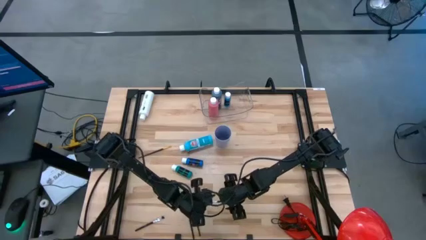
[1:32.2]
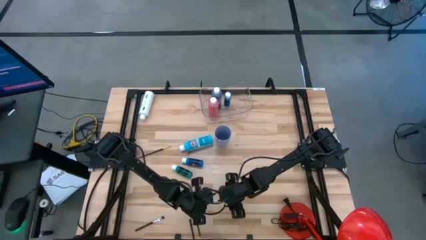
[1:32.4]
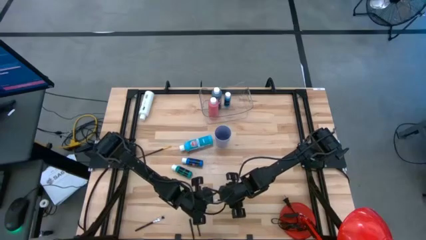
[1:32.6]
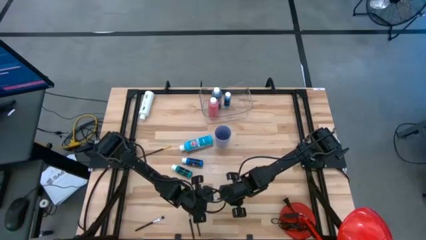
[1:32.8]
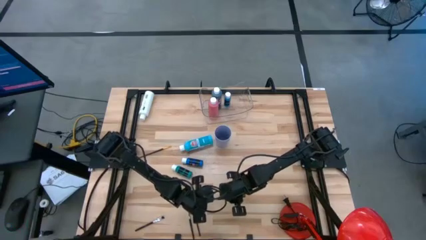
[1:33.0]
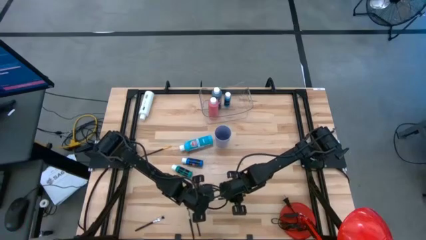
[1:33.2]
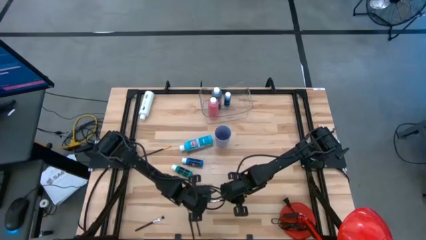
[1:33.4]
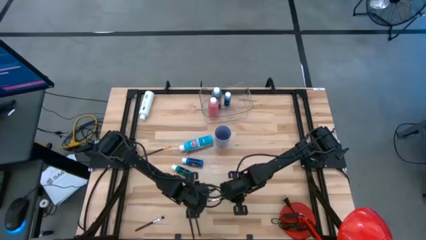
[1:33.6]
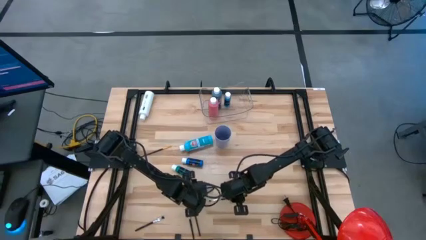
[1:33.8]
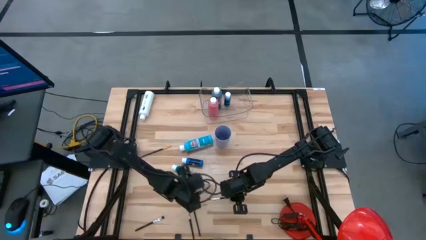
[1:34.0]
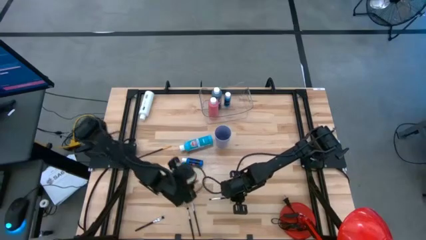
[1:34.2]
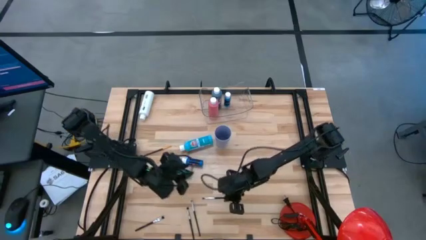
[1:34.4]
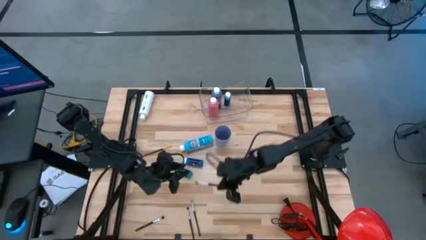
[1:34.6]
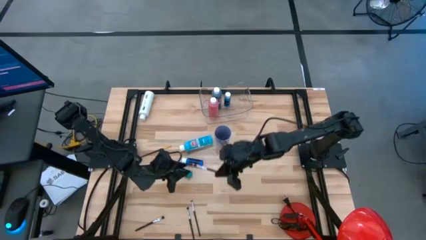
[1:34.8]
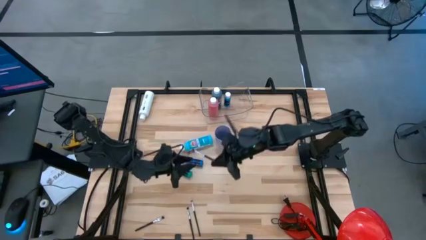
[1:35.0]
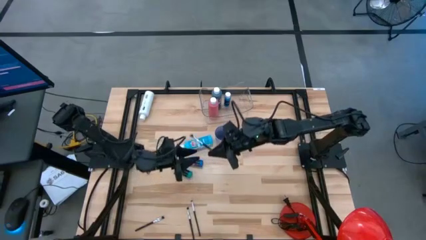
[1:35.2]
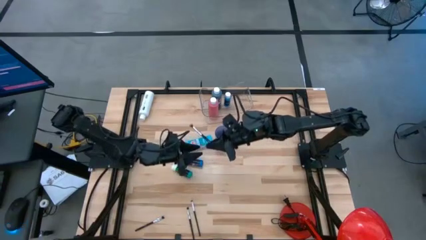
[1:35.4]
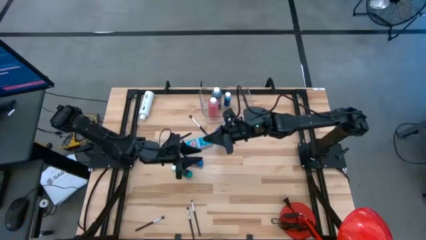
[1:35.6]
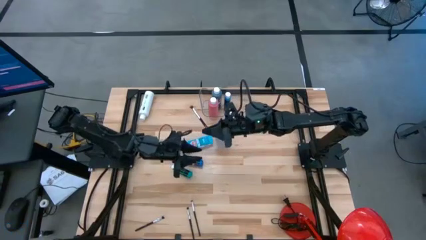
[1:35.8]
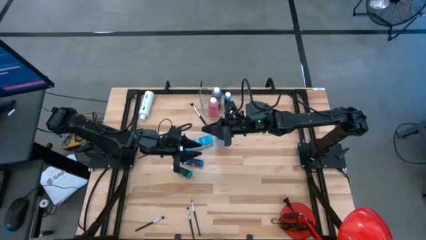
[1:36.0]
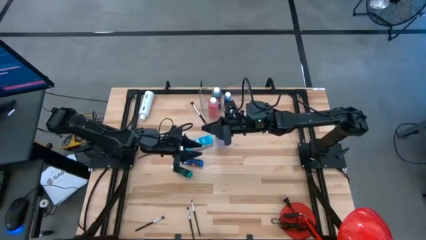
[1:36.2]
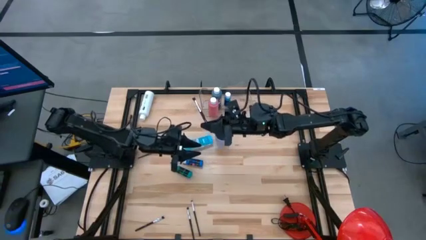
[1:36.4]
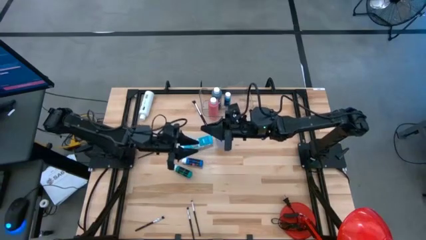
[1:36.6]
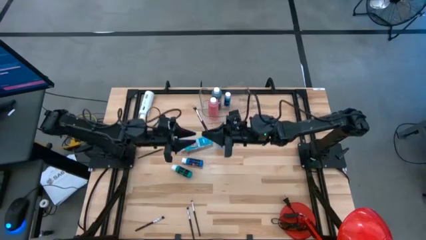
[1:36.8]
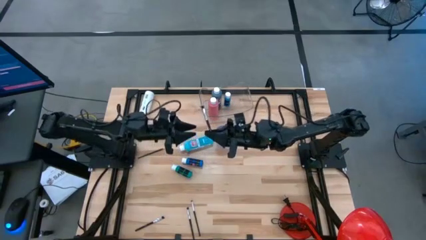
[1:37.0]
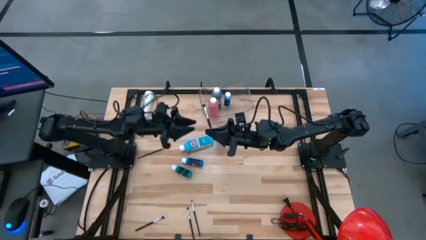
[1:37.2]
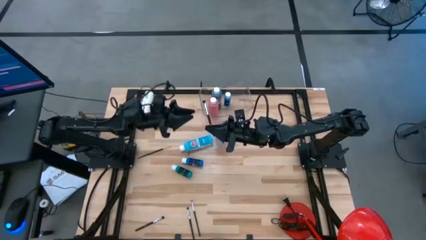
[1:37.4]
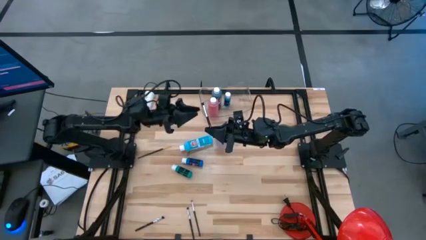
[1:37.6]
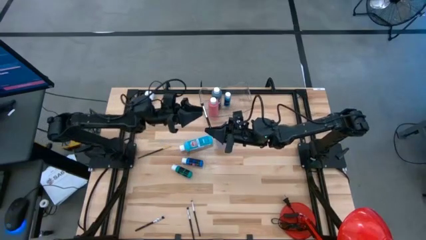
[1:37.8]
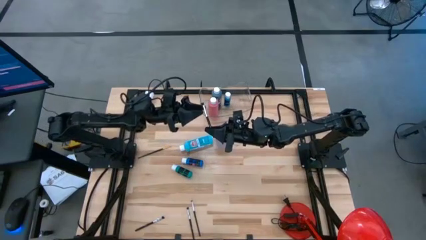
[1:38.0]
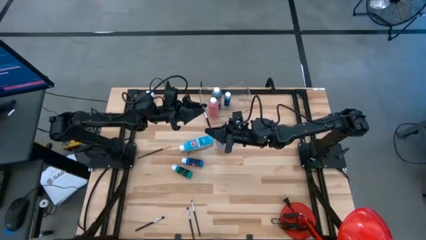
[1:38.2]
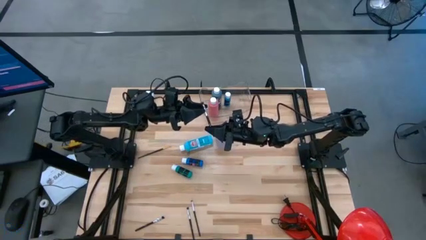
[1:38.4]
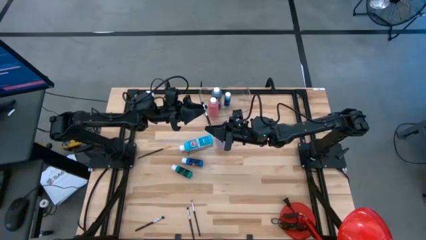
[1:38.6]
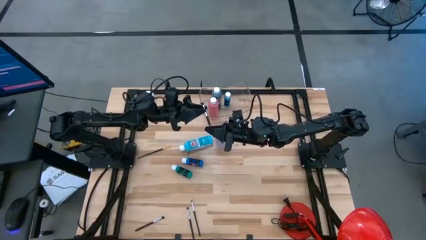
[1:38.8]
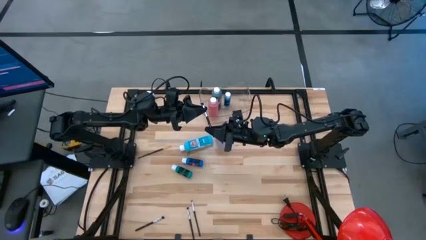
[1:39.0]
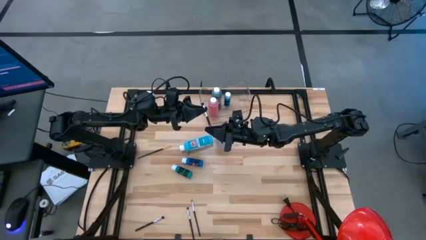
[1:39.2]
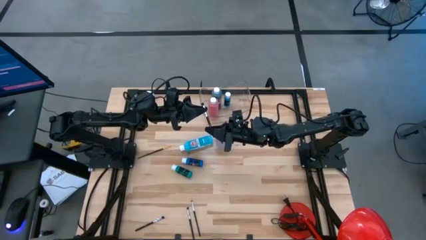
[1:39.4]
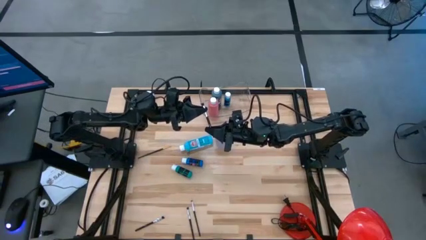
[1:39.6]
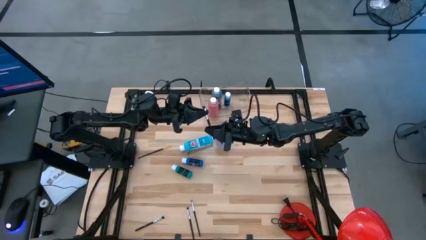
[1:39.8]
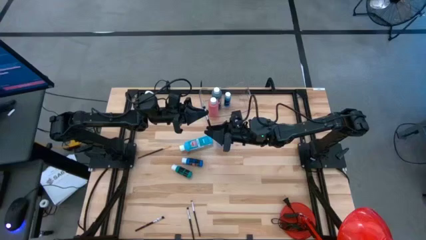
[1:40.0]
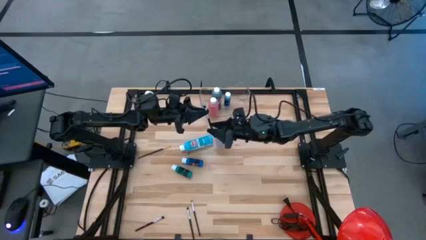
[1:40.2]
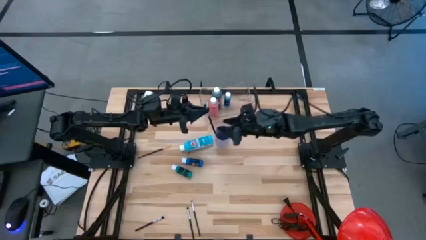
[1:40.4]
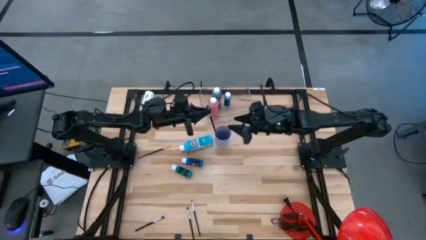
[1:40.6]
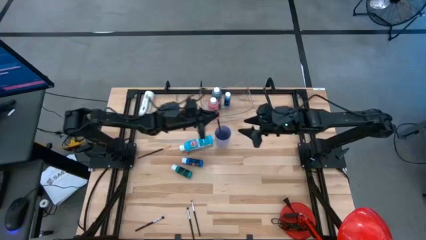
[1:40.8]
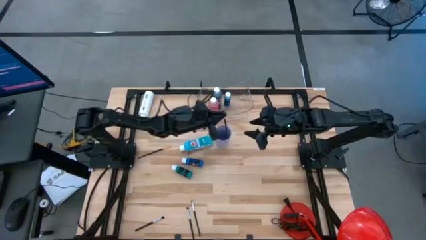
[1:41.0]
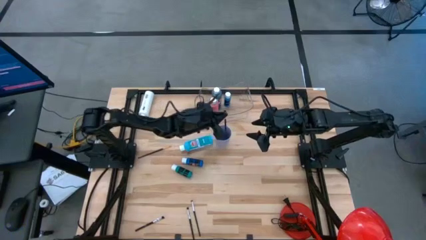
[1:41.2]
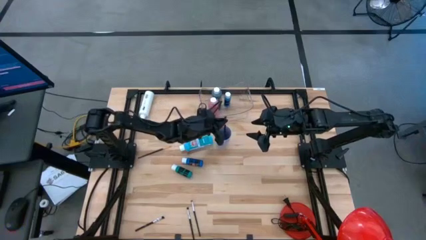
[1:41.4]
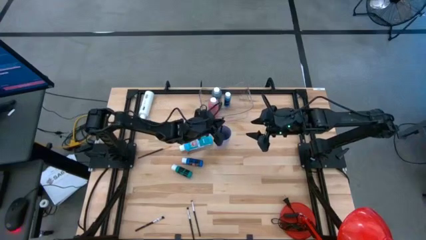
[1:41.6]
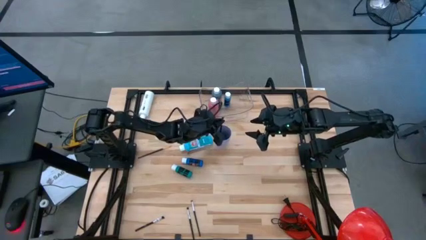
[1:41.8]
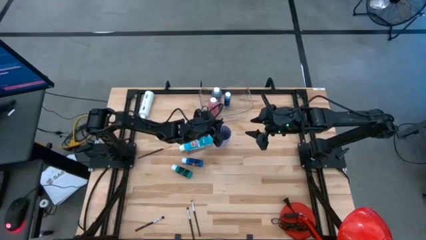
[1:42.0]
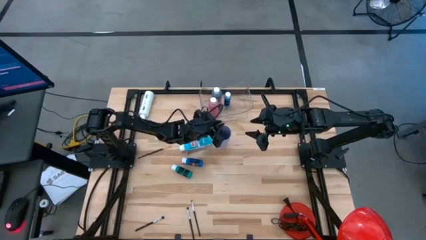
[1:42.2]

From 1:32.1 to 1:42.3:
Task: Pick & Place Paint Supplies
Put the black paint brush into the violet cup

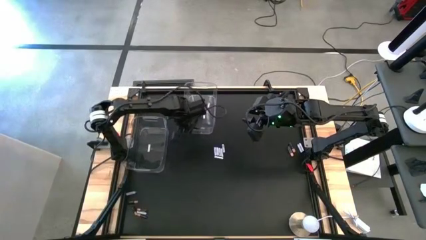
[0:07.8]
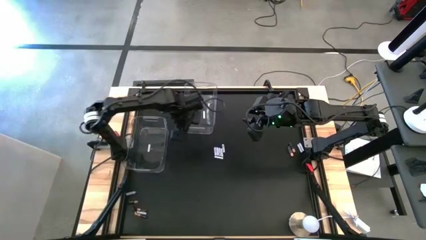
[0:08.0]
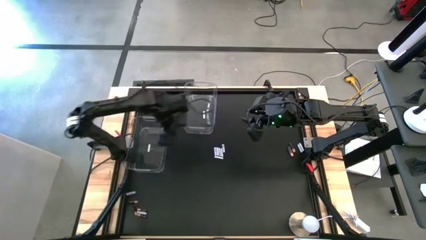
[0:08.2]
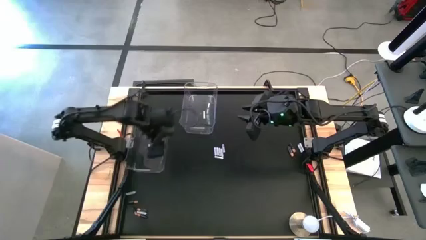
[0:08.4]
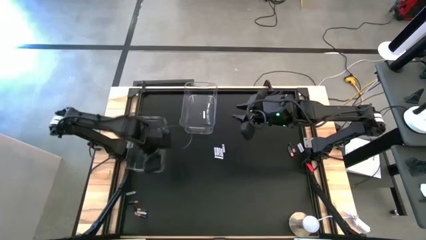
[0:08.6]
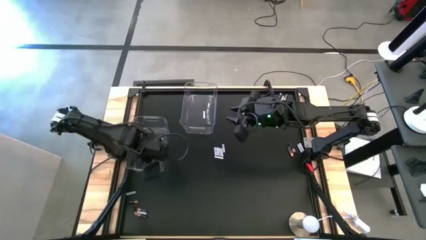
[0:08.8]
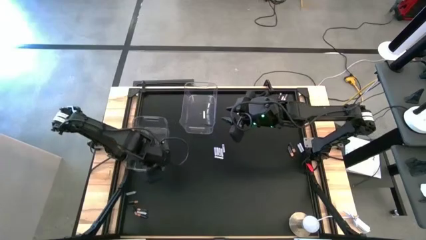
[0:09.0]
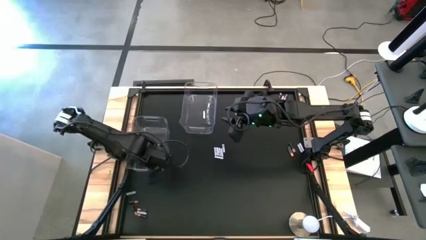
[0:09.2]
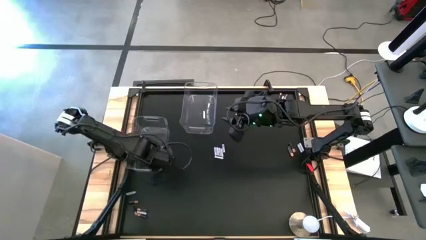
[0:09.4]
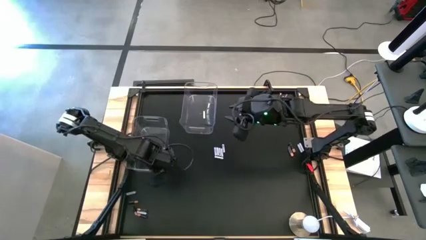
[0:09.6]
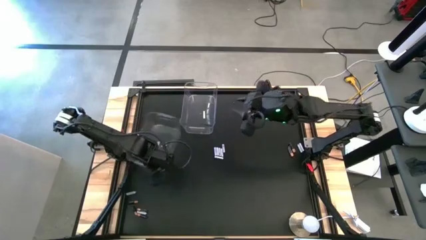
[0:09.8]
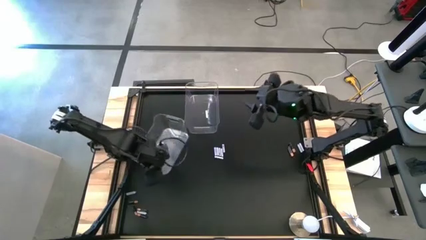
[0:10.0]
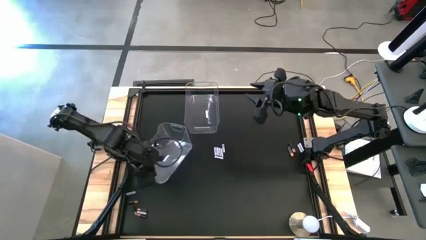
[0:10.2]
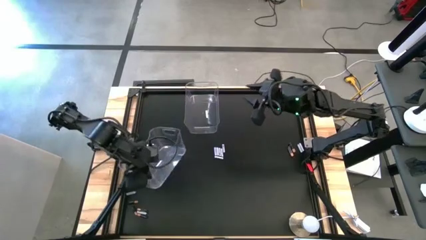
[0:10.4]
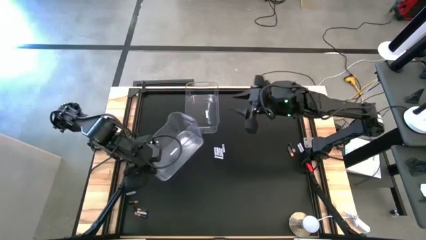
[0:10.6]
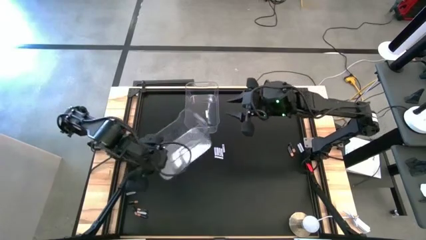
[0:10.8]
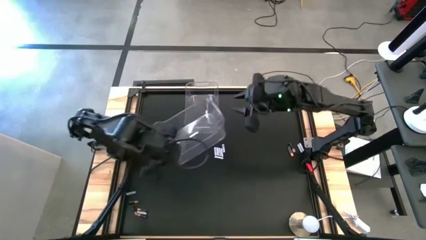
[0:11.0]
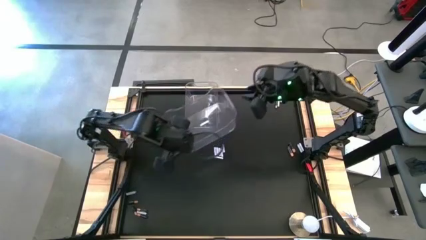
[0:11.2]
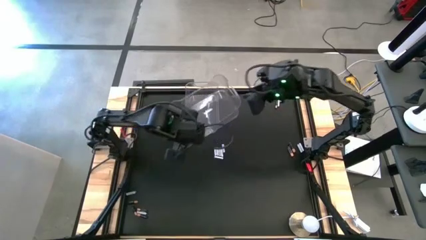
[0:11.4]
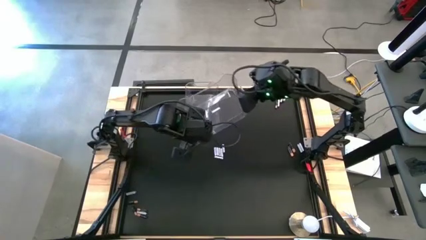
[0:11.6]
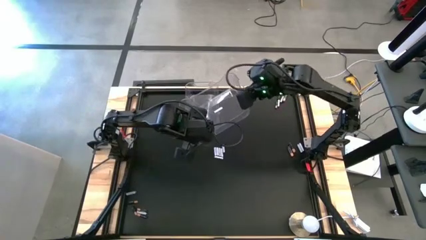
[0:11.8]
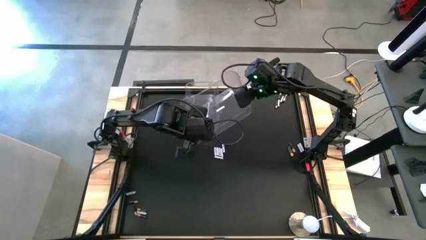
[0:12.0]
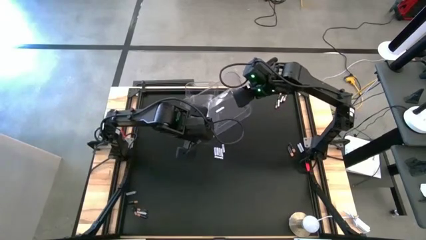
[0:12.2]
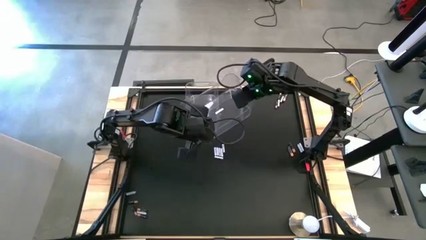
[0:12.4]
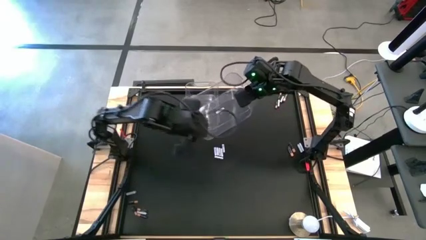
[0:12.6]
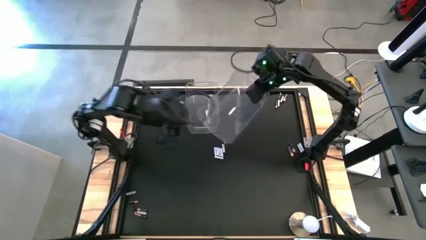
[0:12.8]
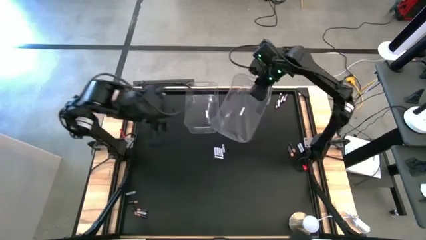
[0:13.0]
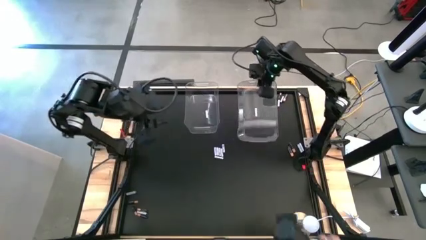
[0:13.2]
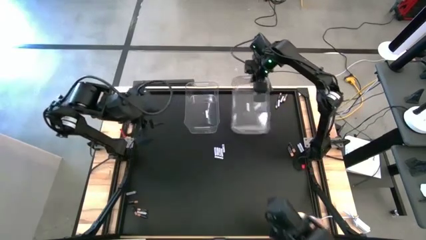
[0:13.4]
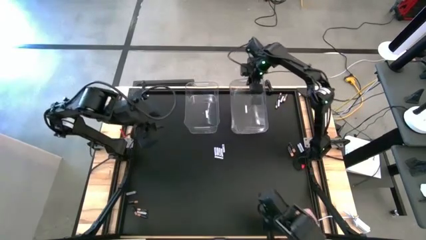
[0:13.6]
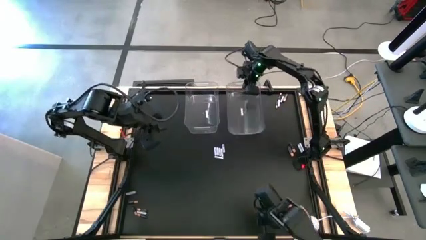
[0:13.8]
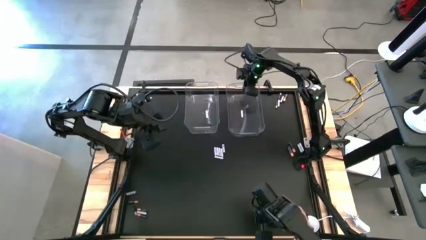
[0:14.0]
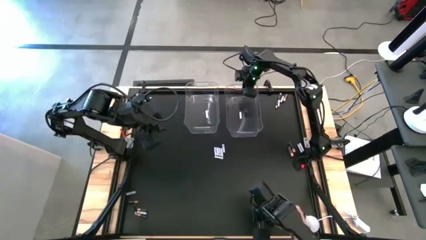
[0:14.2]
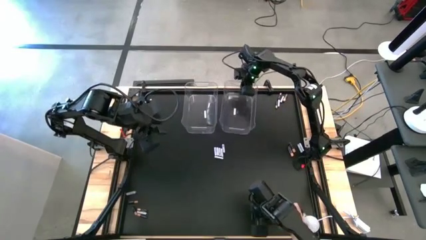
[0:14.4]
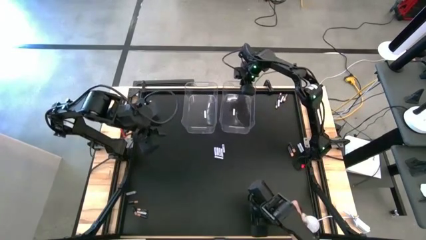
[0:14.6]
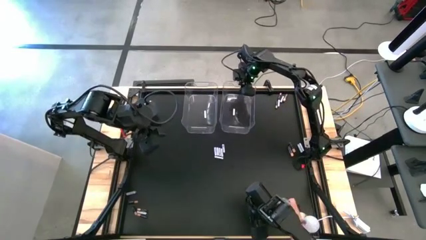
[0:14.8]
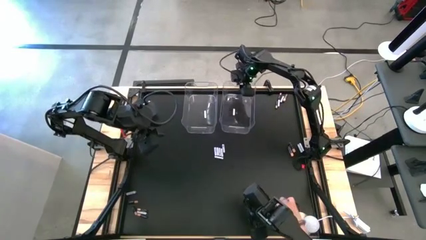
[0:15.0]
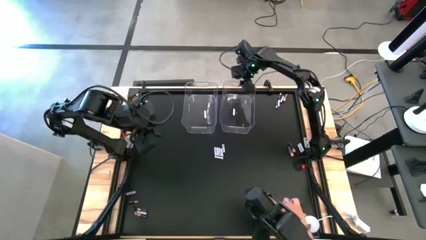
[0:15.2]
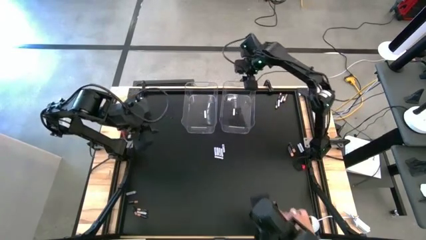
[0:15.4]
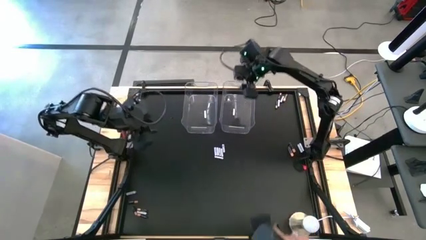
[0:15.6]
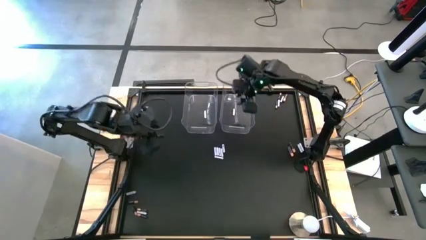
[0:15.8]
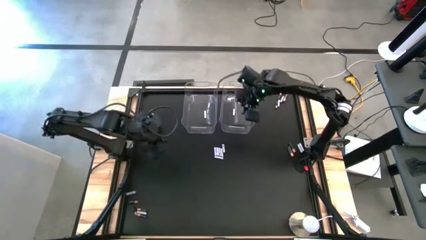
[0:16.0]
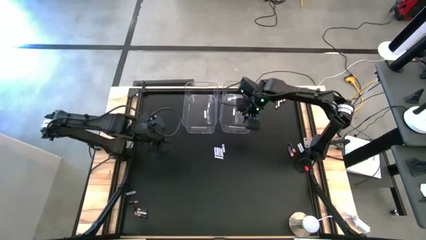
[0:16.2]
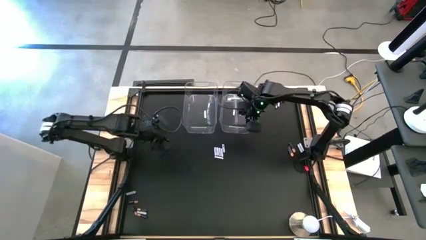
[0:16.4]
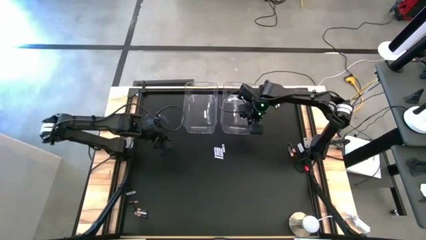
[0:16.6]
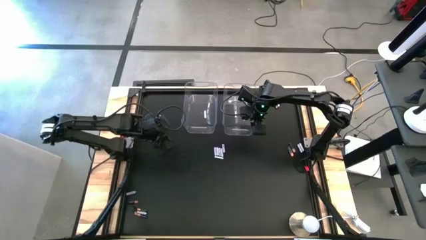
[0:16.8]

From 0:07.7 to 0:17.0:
Task: Sort batteries
Move the transparent bin to the top middle right
